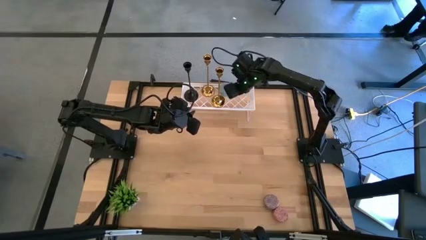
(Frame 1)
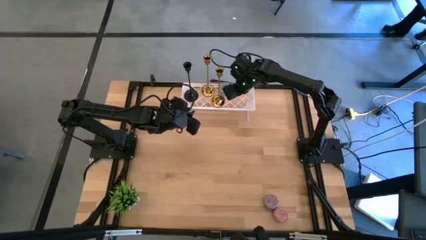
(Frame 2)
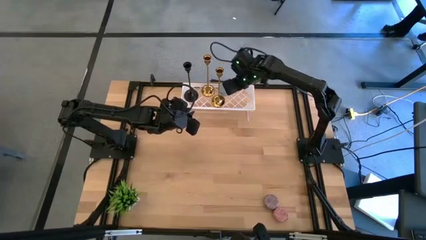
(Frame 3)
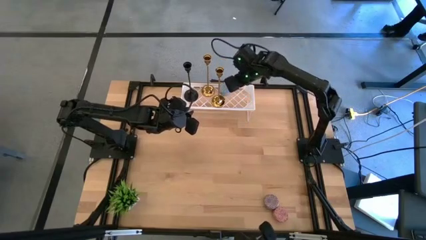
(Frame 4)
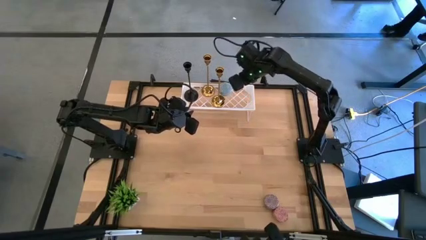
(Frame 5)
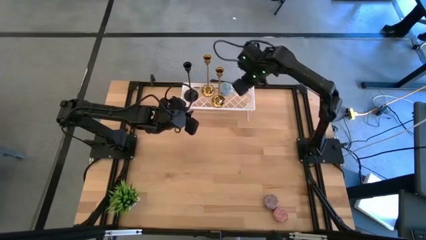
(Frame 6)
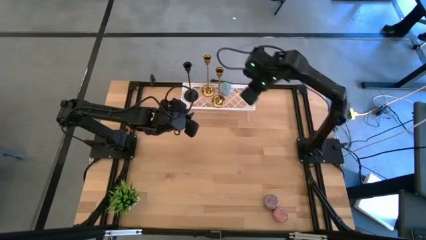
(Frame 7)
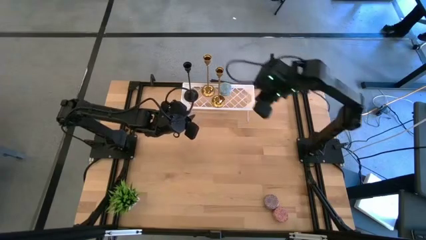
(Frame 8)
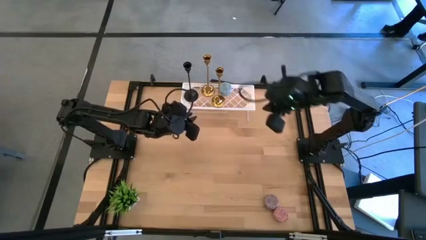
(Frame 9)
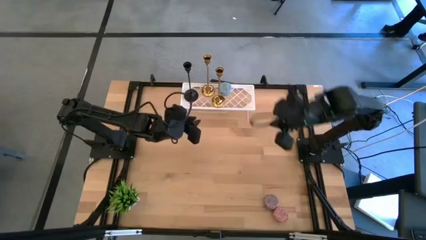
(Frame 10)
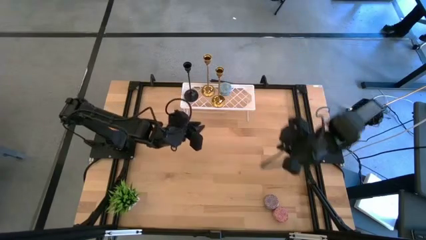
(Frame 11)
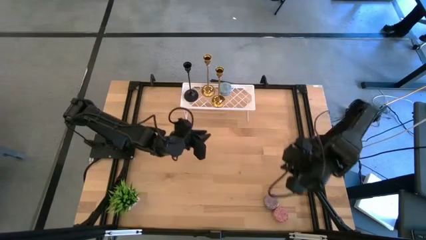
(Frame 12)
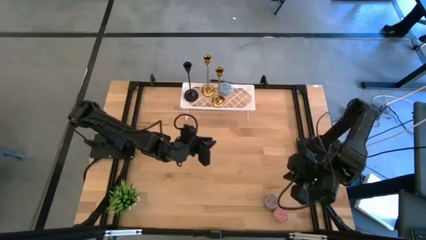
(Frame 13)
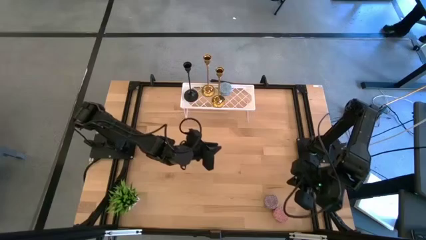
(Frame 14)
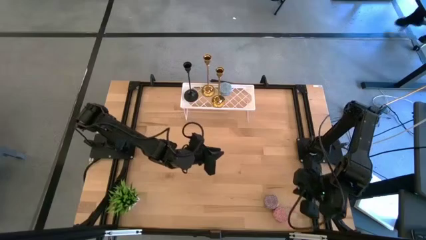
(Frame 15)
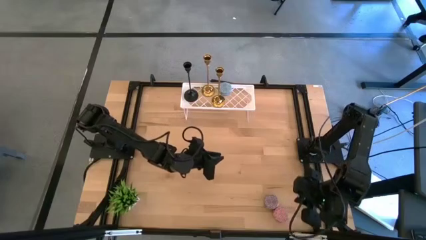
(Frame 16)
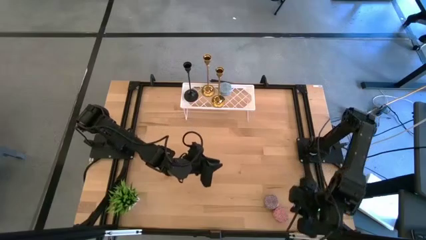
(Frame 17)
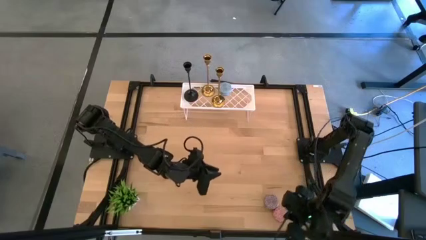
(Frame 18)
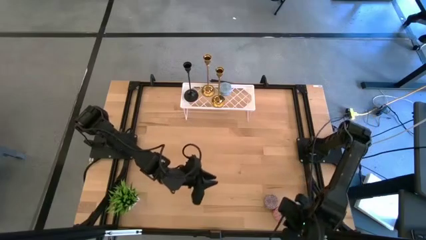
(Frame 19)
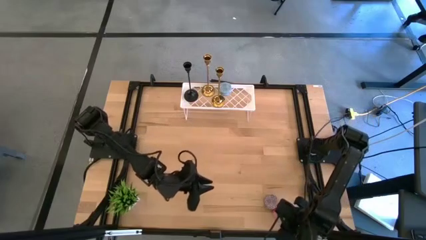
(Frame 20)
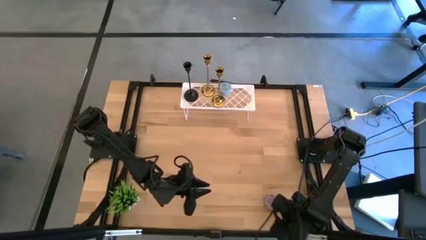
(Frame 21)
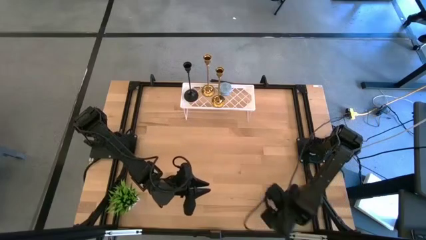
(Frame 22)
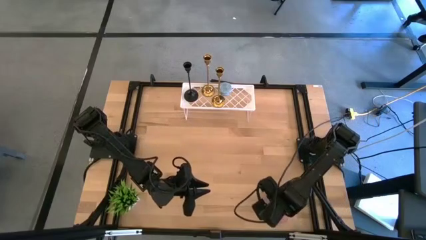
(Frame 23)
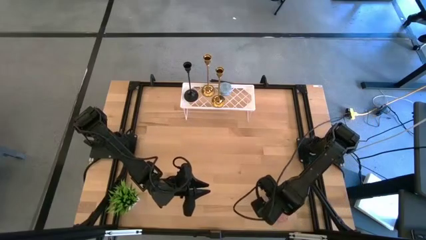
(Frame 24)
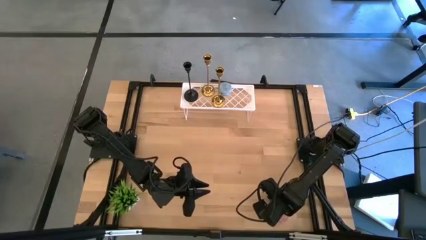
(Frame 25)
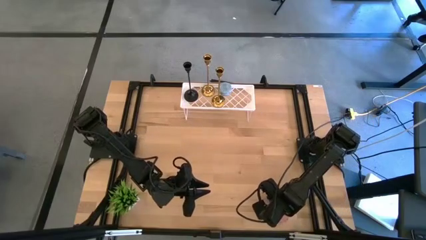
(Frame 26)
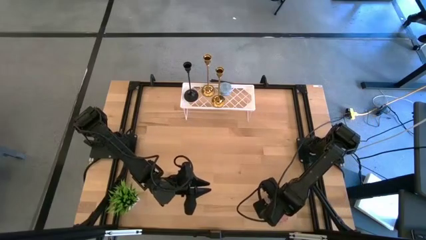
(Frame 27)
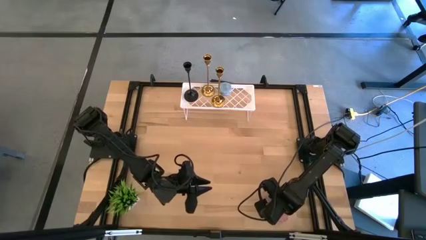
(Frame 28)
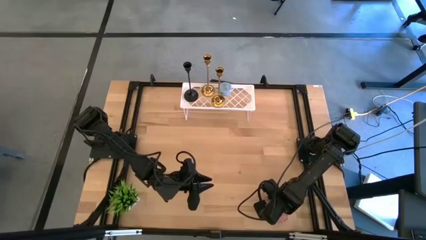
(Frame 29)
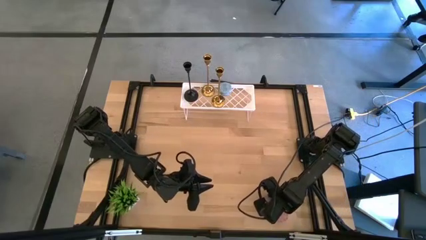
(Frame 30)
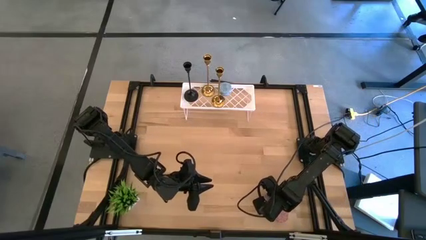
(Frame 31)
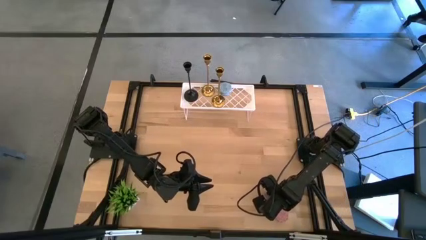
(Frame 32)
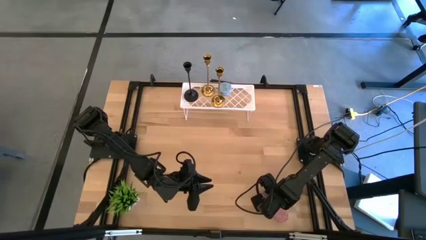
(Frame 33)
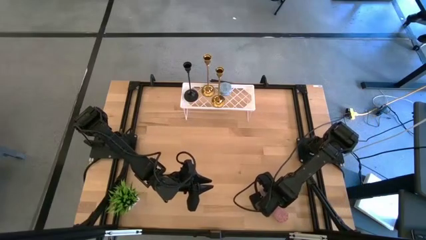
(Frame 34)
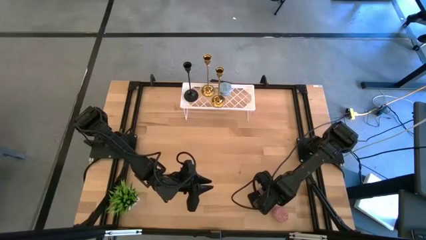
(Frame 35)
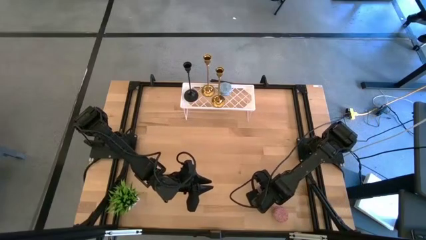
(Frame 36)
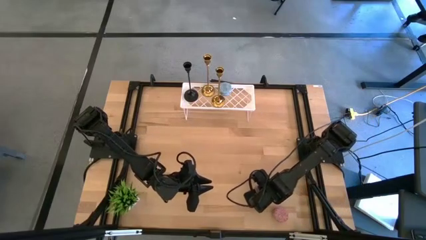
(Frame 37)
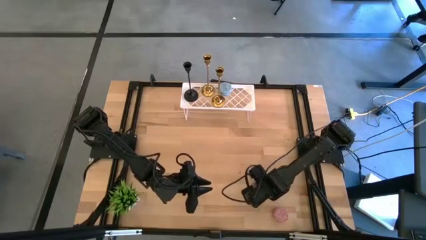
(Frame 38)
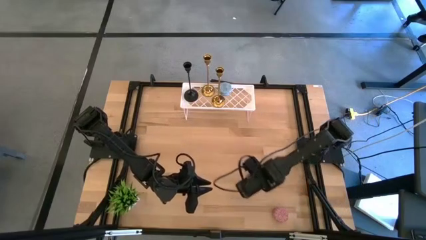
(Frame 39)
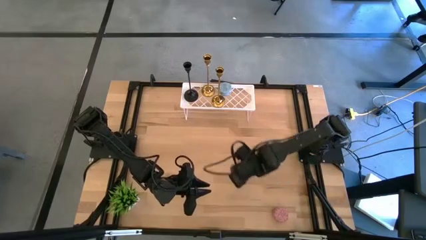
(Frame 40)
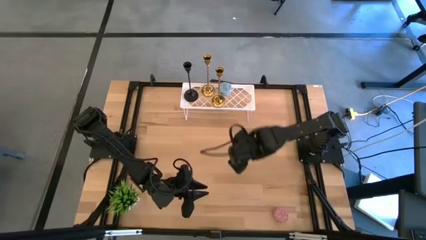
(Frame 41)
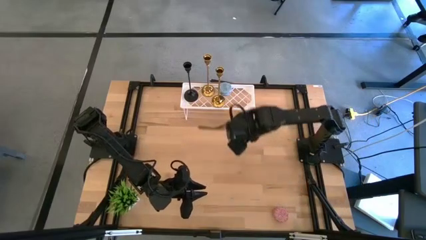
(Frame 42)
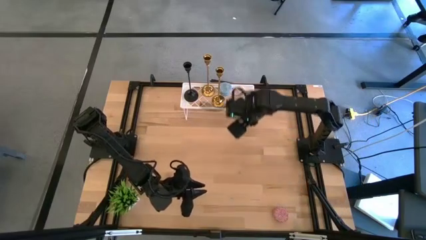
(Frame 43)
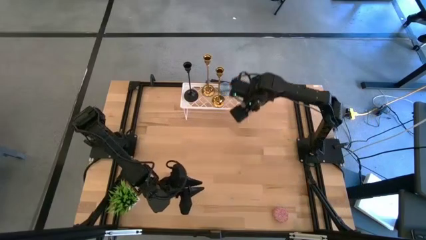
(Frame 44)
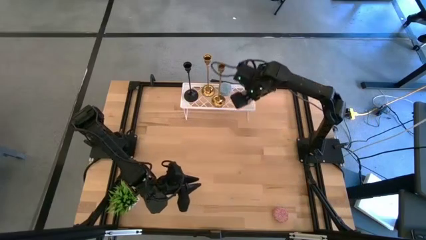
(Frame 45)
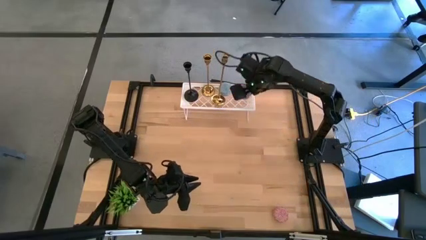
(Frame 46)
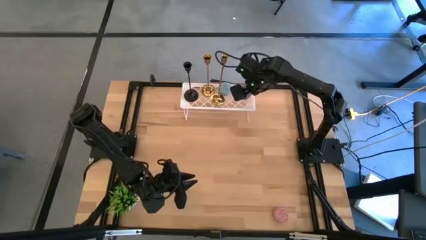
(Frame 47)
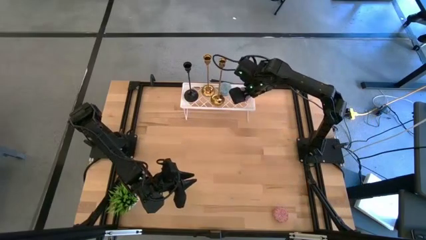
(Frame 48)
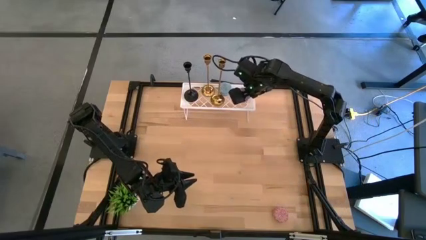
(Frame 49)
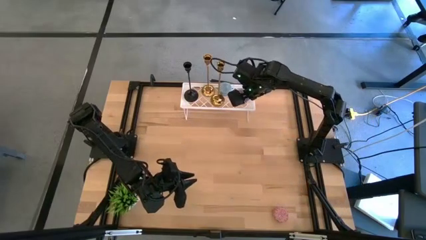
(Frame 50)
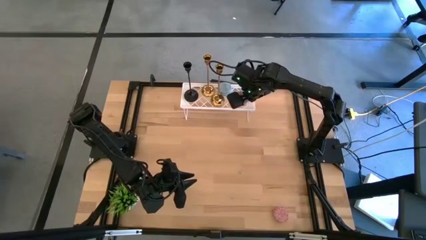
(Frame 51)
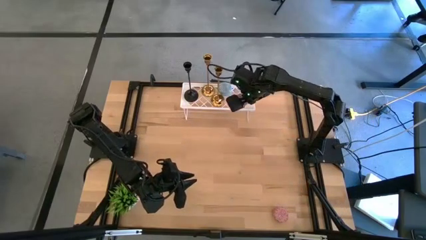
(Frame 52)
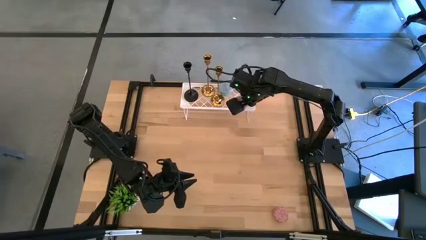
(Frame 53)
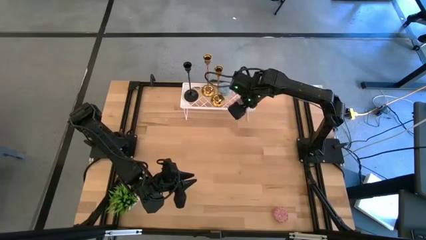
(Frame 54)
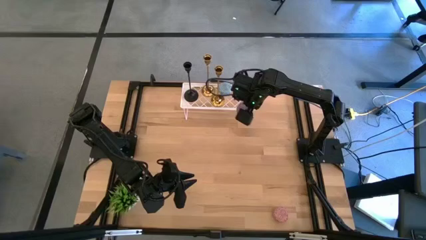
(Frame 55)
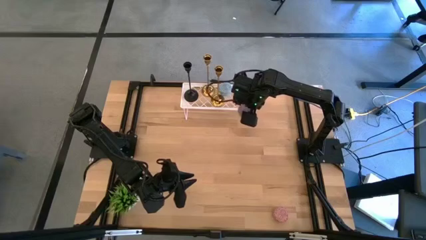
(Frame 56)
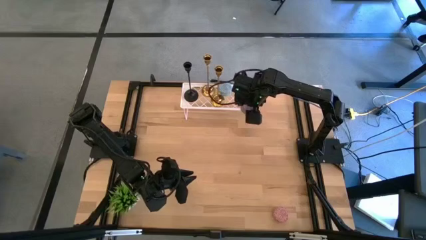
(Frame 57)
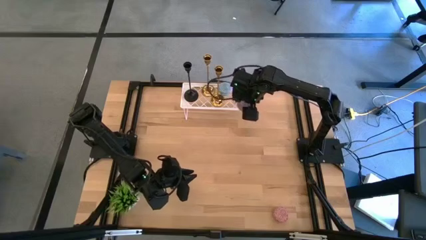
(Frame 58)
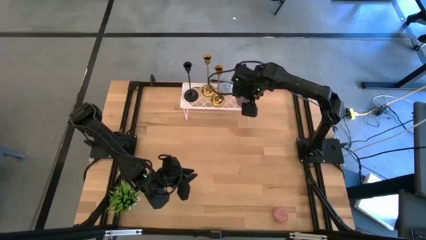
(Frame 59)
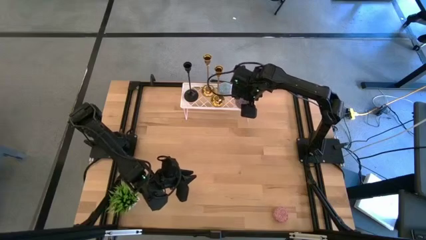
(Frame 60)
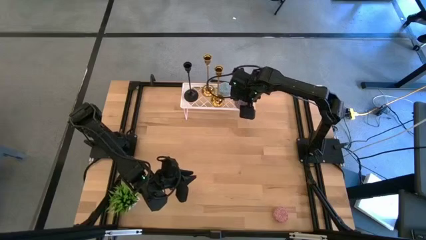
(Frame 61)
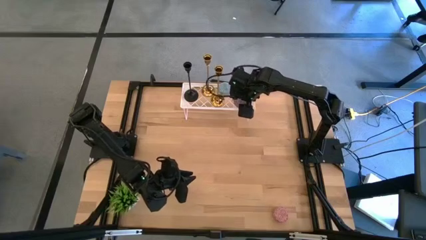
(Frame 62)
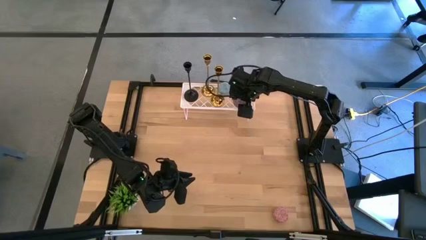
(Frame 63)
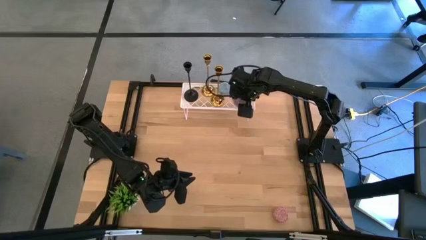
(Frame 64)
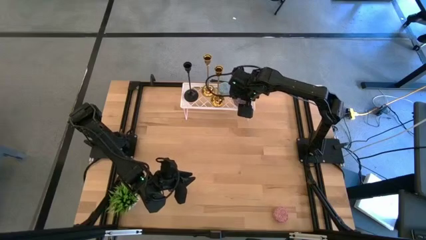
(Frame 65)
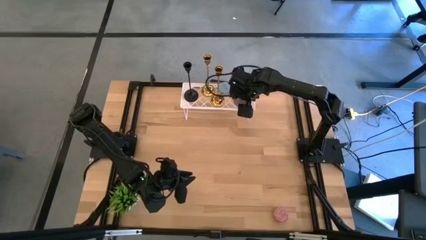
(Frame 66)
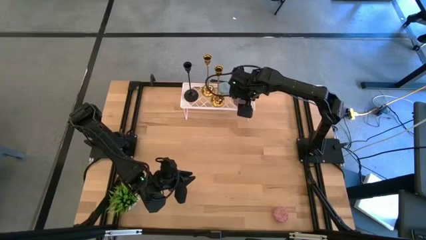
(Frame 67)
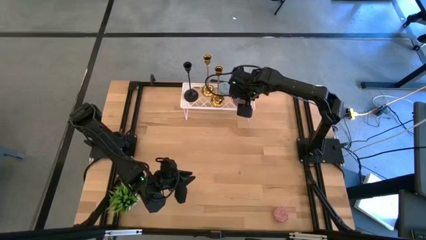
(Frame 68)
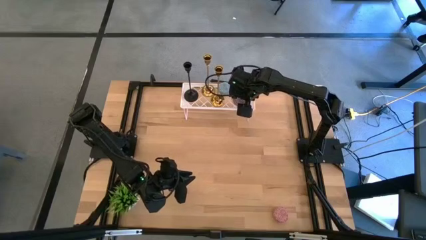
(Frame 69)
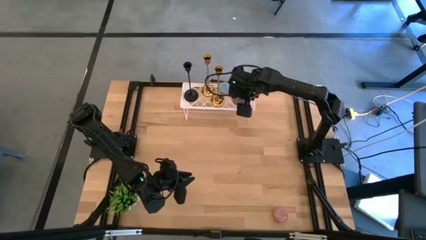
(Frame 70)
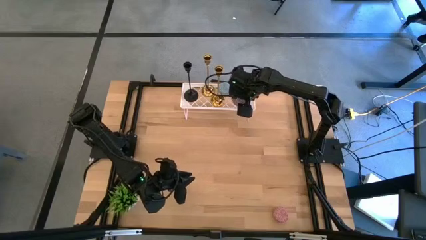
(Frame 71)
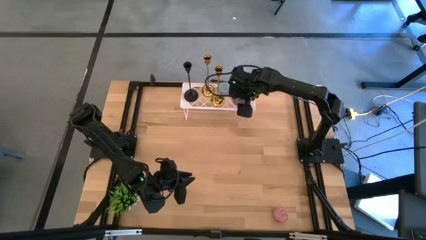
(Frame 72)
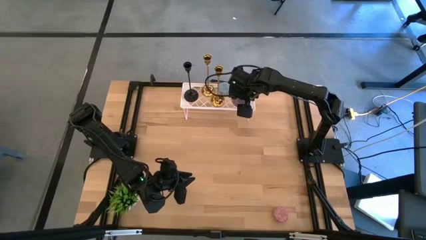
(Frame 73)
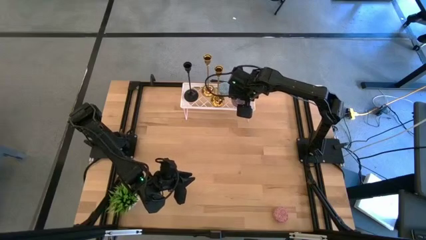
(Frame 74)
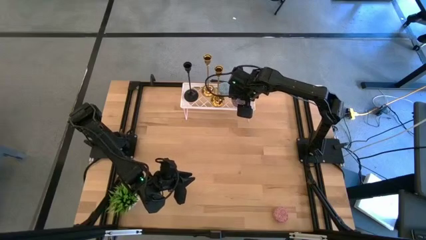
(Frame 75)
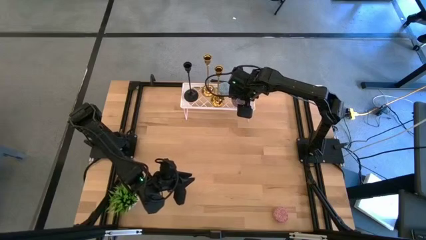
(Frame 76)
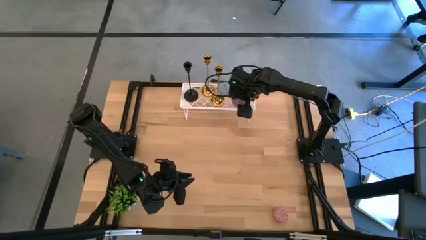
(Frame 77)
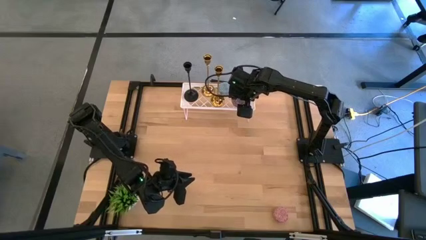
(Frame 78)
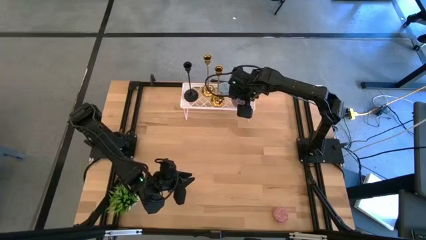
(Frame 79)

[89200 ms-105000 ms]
Task: Pick & Place candle stick holders
Put the red patterned scented candle on the shelf
